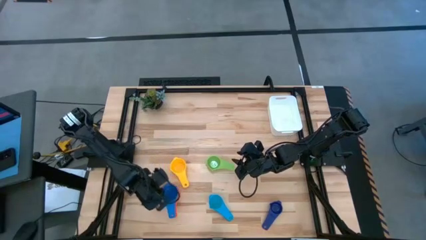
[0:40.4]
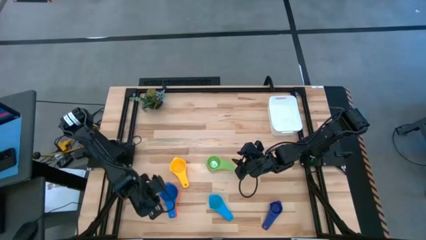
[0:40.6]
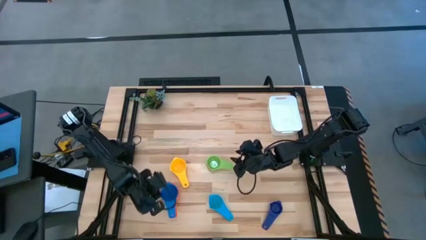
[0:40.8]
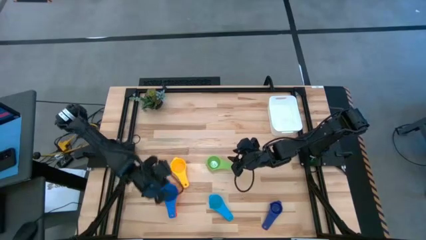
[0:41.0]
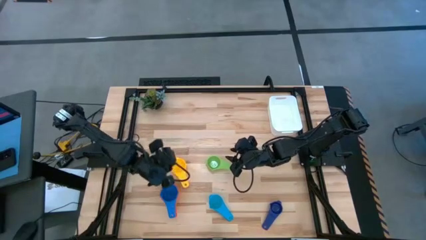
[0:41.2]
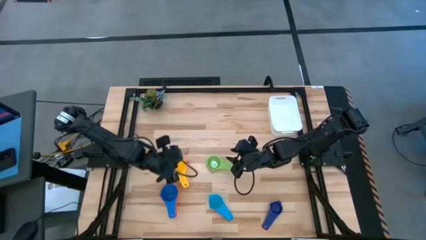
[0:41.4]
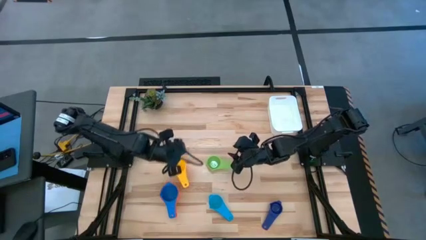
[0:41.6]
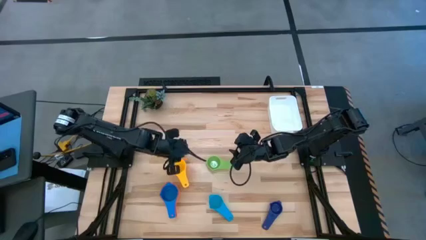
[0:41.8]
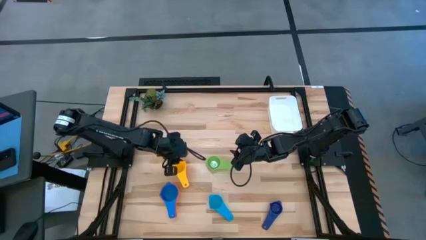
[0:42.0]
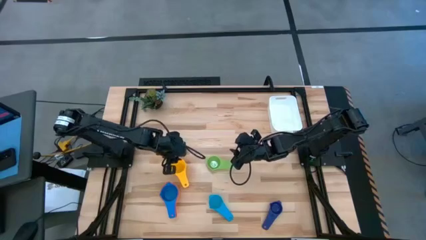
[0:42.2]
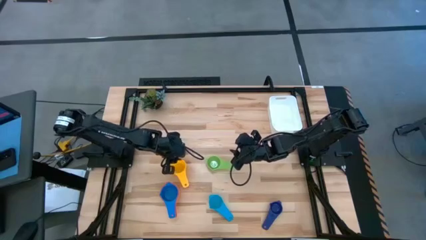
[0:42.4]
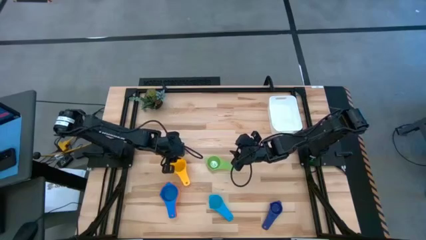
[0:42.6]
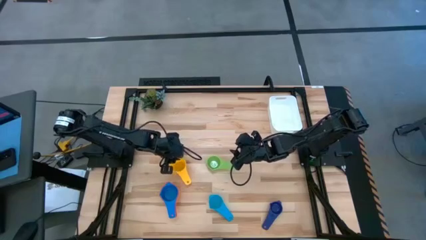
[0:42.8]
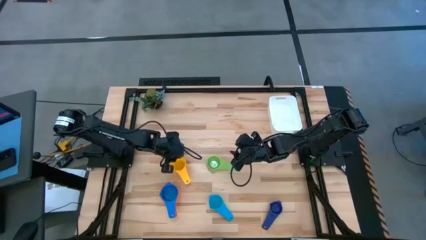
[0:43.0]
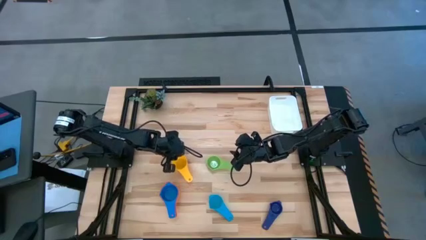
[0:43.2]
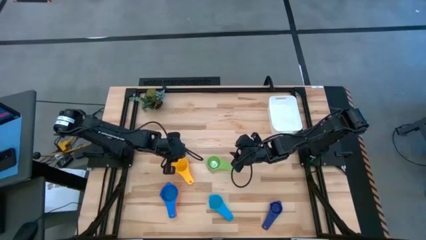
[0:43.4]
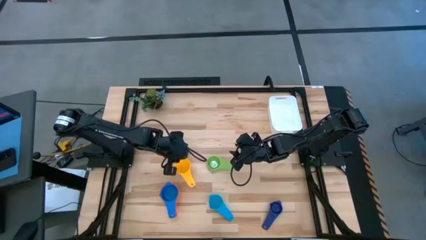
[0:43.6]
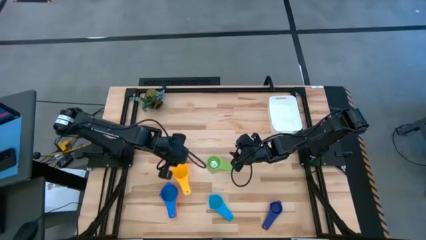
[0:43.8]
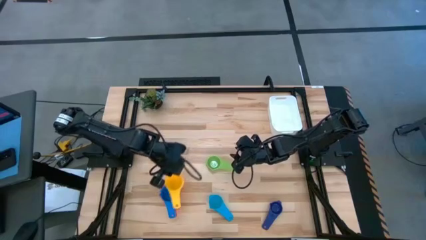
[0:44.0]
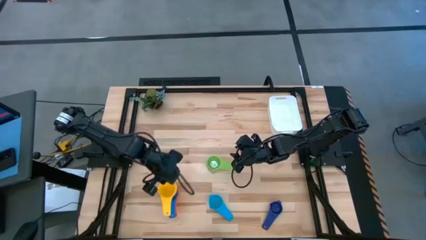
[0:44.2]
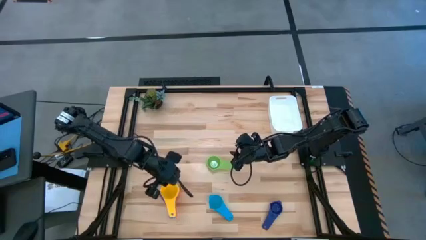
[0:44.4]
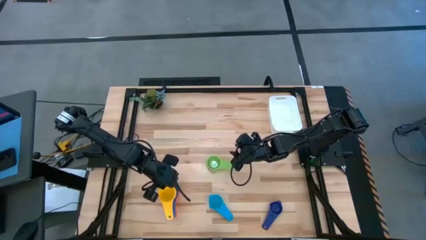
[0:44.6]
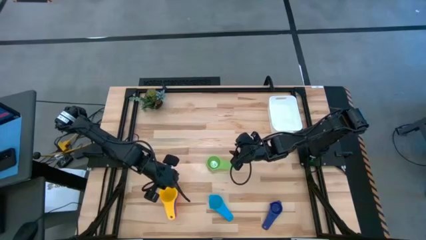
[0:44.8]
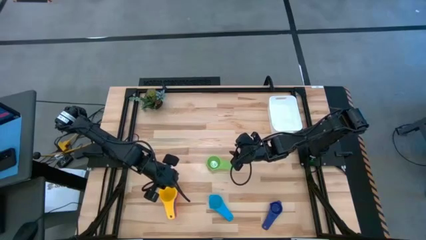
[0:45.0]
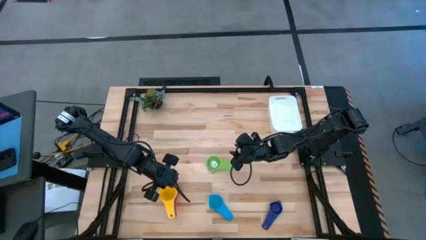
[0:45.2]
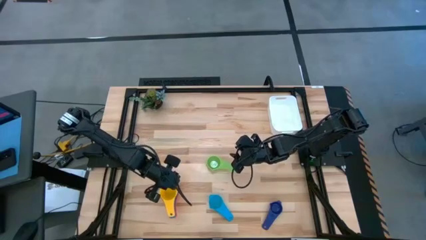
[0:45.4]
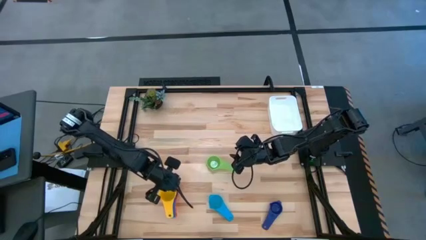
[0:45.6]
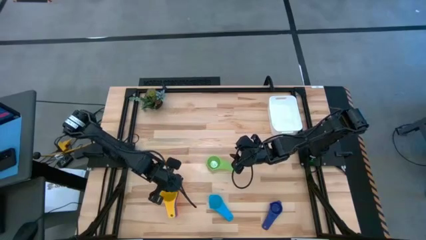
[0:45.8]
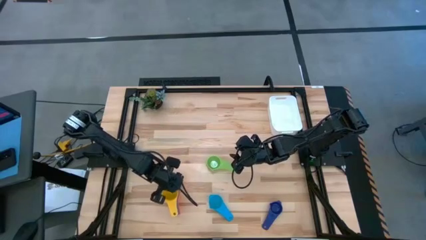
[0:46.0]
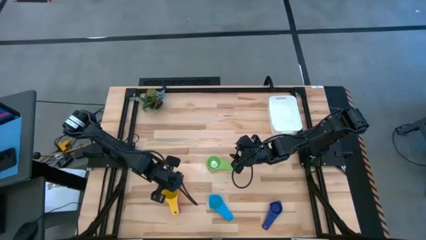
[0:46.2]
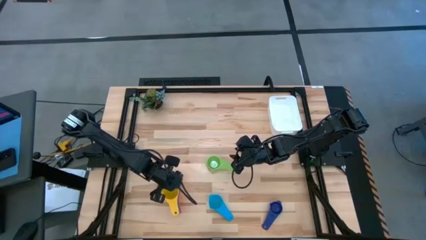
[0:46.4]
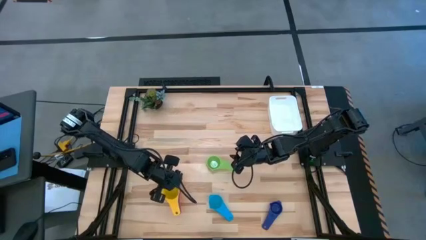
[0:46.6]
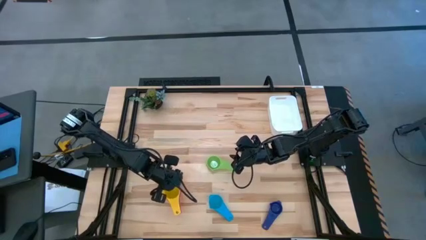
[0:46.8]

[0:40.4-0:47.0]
Task: Nest measuring cups in basket
Stack the yellow measuring cup on top of the blue measuring cup

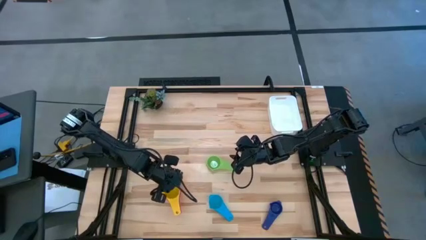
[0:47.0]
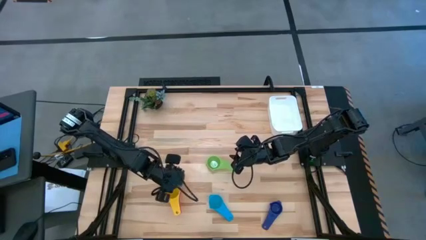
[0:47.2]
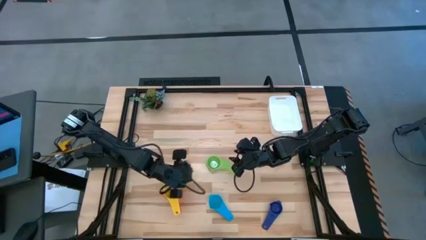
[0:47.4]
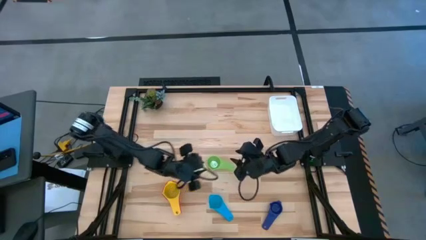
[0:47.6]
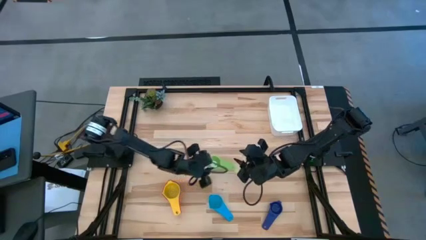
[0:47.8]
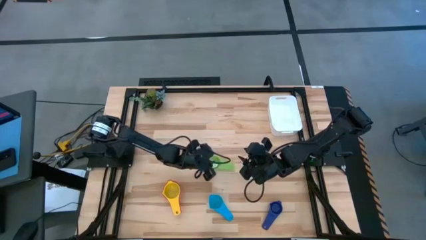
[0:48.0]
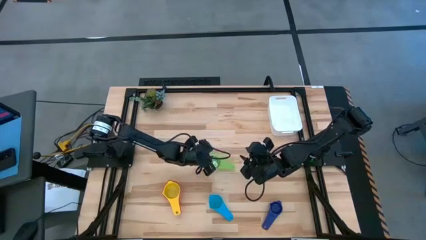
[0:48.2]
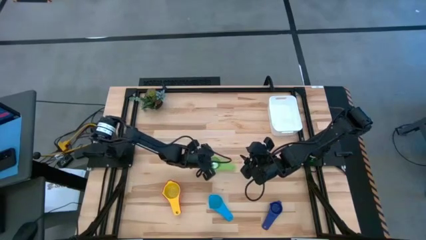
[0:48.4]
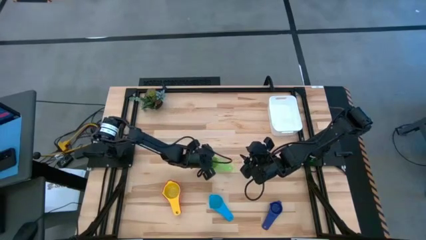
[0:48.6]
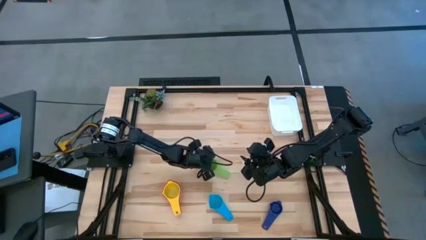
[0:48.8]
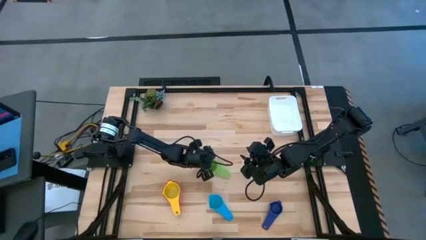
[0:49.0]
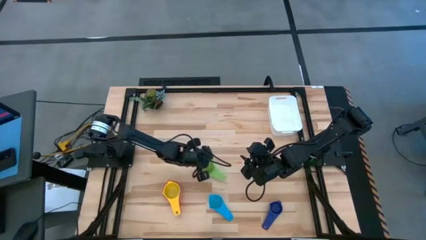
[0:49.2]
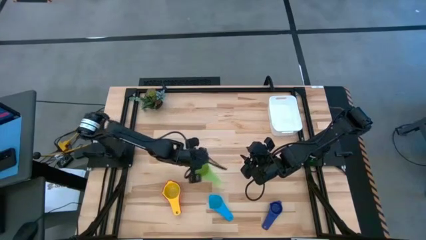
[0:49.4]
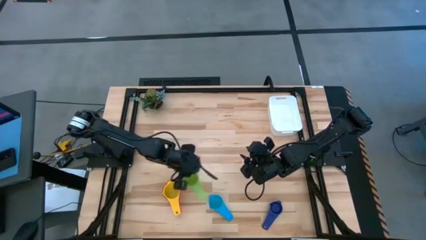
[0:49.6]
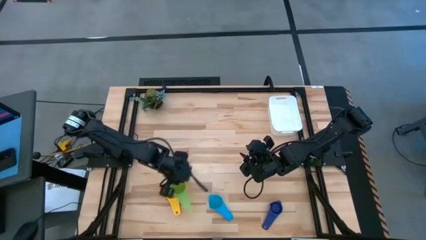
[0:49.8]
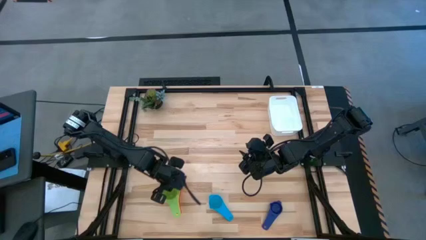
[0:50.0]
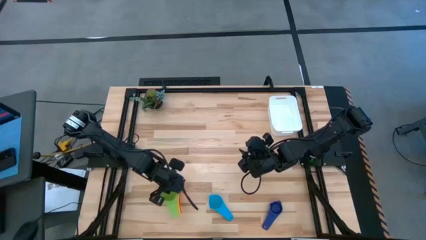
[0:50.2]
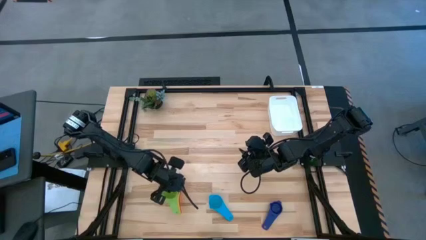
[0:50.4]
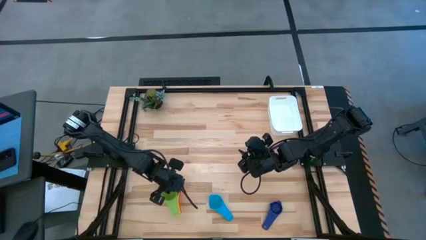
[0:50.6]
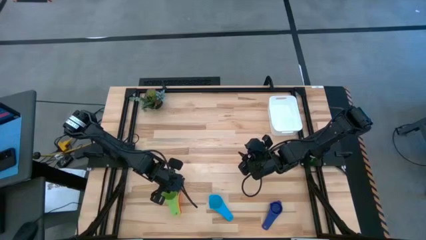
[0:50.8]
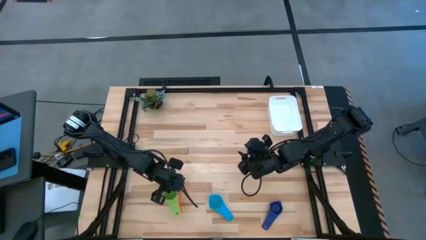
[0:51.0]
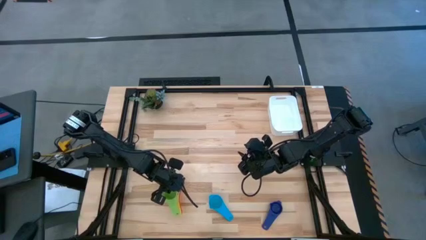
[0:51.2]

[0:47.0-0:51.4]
Stack the green measuring cup on top of the yellow measuring cup

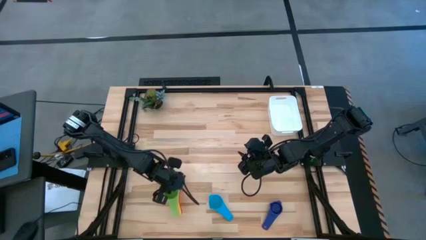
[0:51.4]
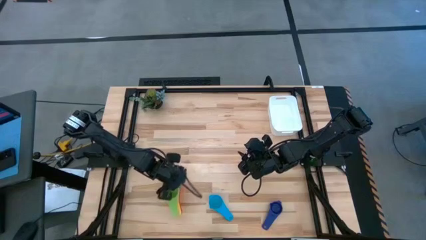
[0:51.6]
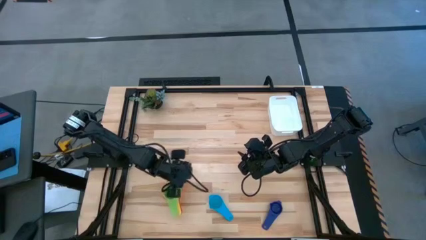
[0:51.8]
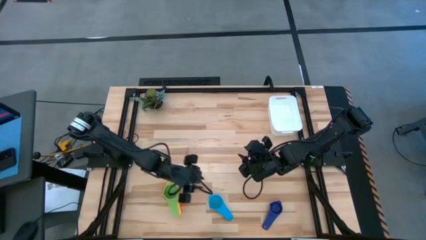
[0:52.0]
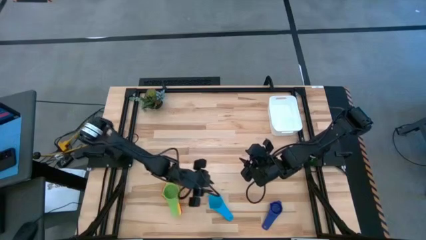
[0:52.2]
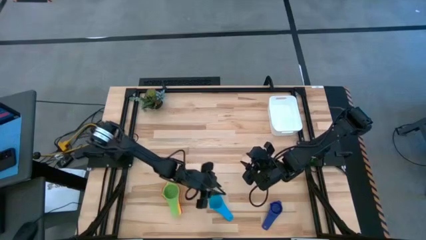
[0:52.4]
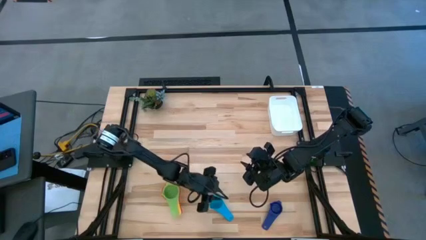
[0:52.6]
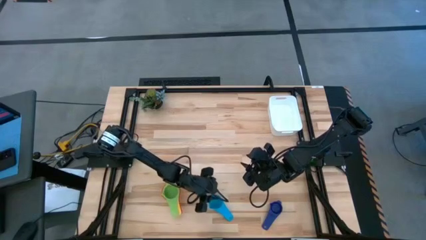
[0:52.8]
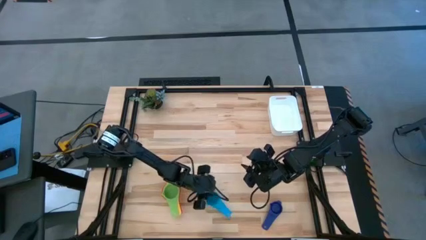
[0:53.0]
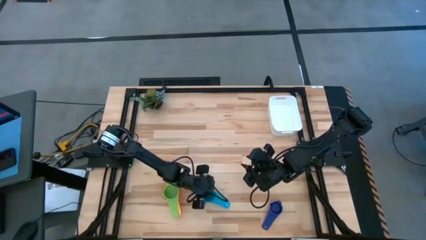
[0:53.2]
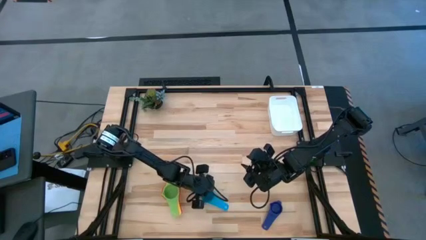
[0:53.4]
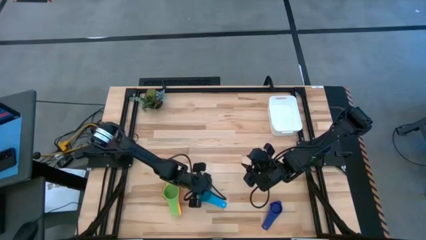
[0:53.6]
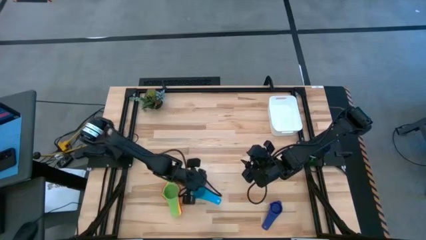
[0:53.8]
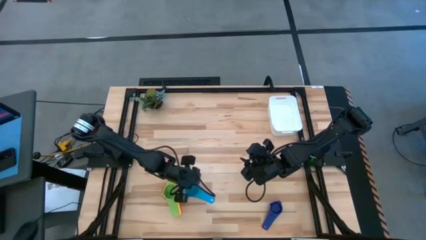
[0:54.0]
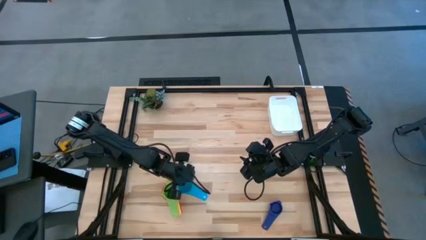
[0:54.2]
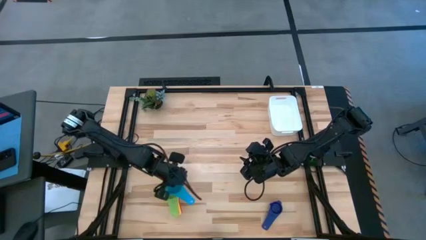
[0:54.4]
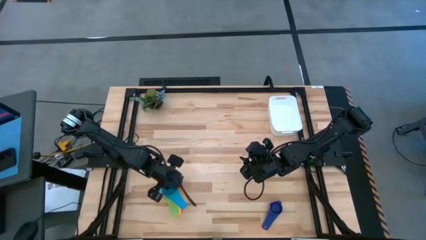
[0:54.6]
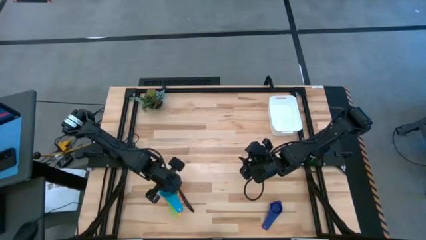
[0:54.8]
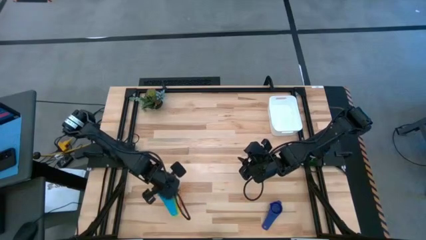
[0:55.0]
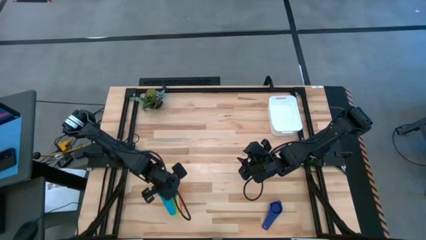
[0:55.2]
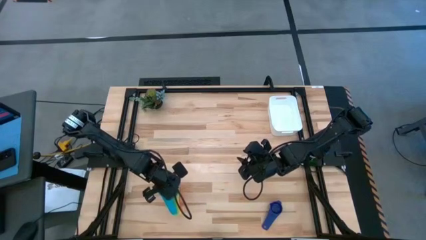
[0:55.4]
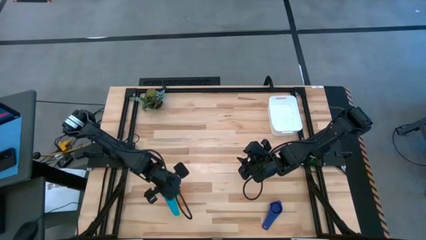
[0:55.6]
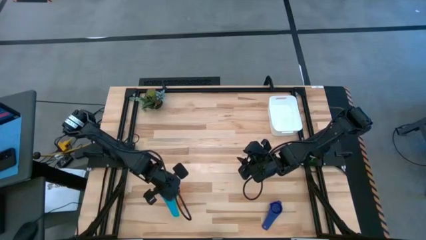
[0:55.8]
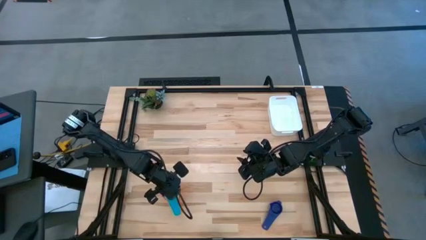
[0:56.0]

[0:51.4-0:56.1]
Stack the light blue measuring cup on top of the green measuring cup
